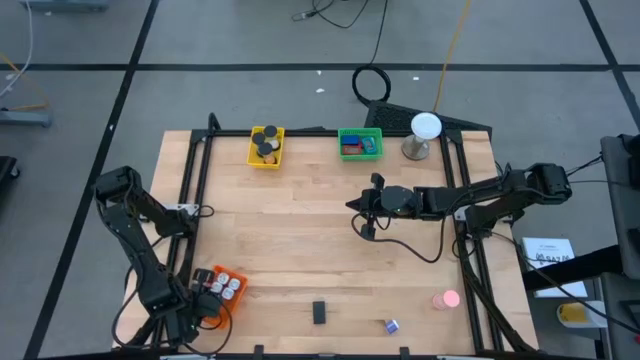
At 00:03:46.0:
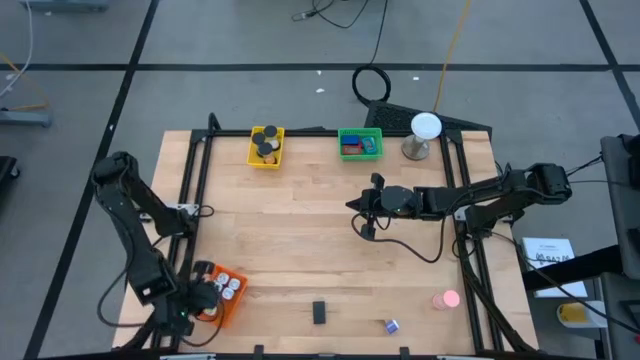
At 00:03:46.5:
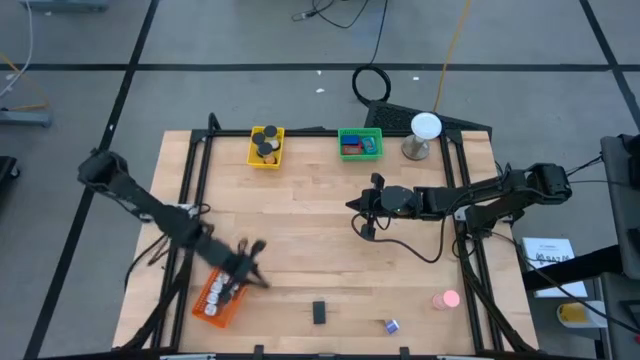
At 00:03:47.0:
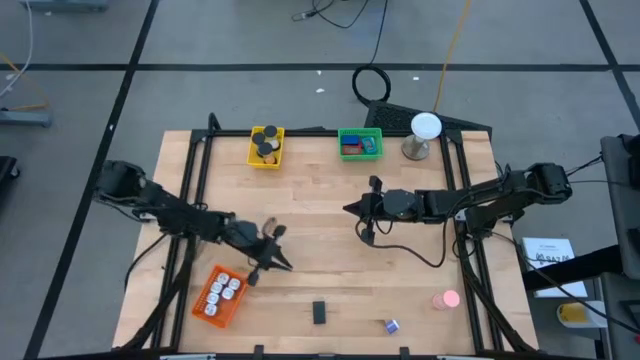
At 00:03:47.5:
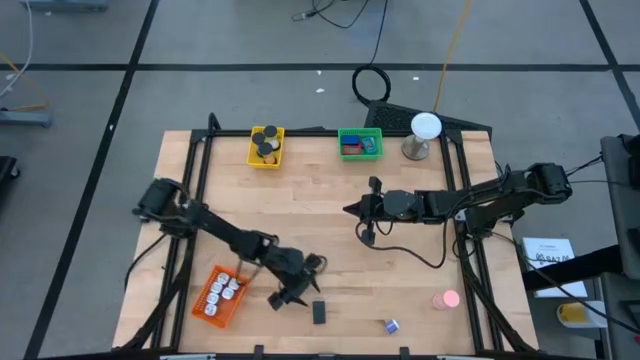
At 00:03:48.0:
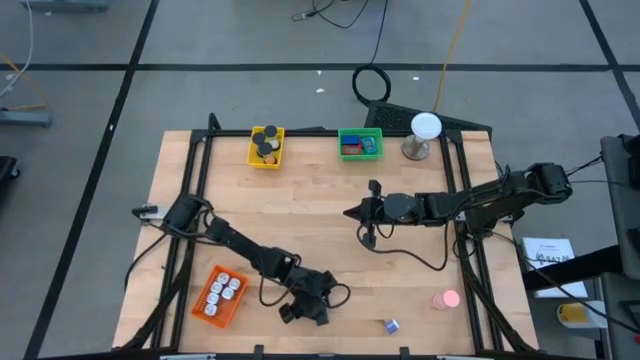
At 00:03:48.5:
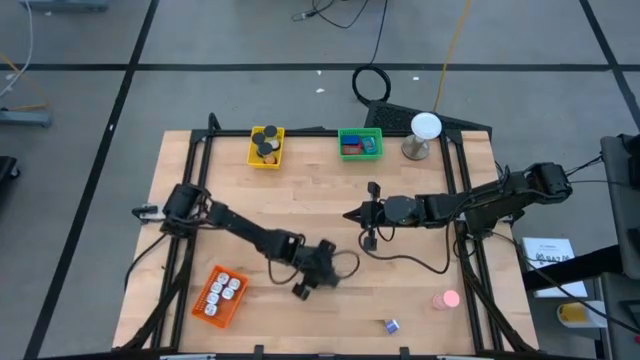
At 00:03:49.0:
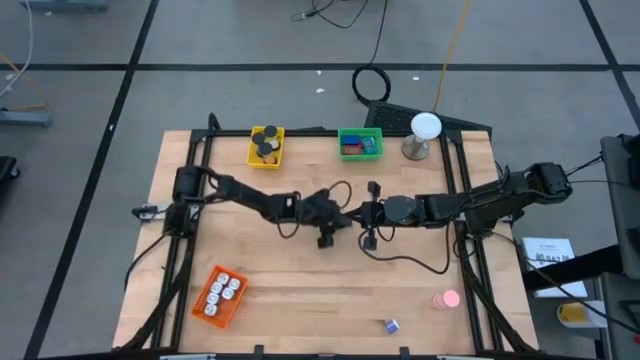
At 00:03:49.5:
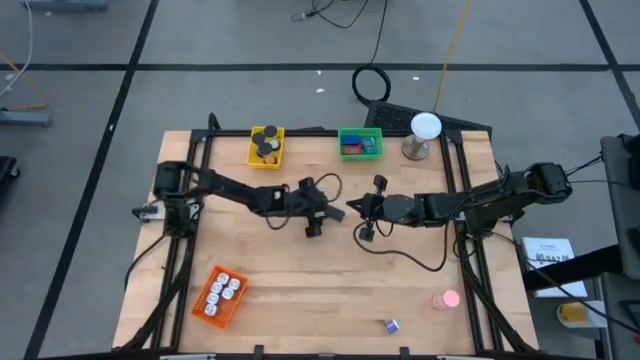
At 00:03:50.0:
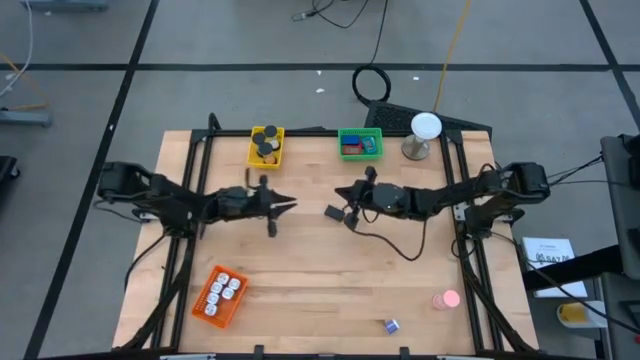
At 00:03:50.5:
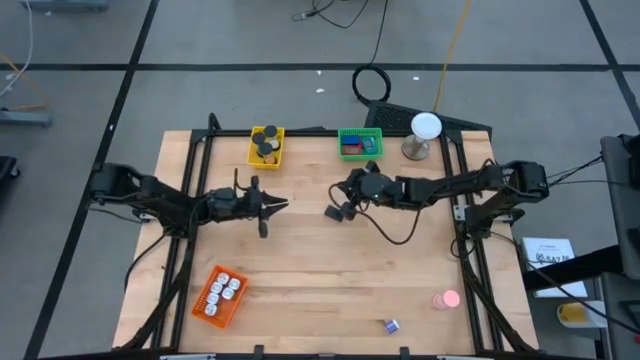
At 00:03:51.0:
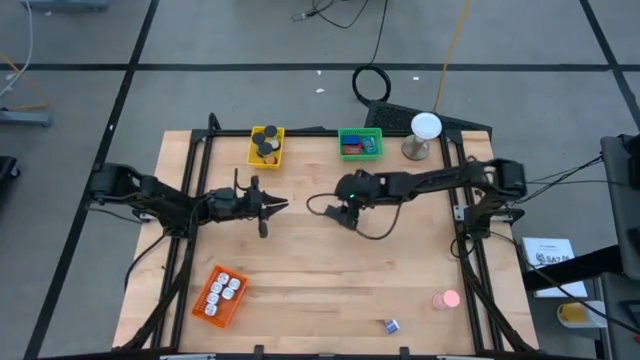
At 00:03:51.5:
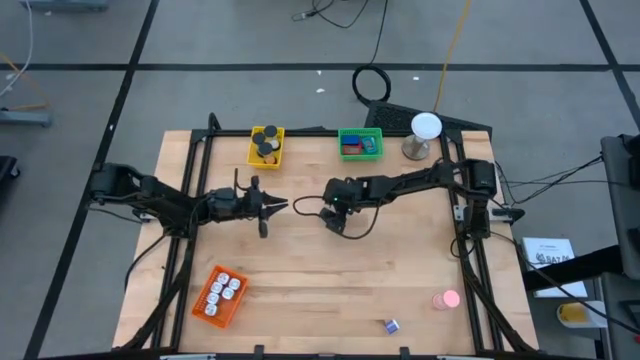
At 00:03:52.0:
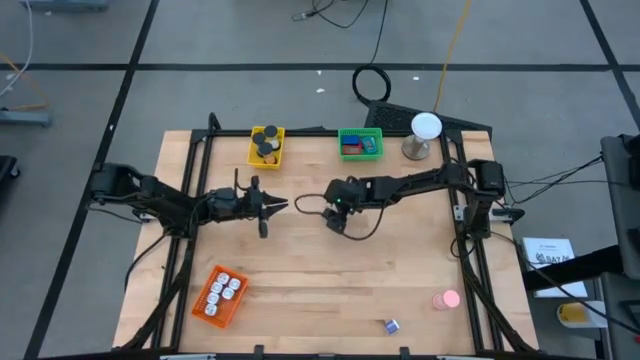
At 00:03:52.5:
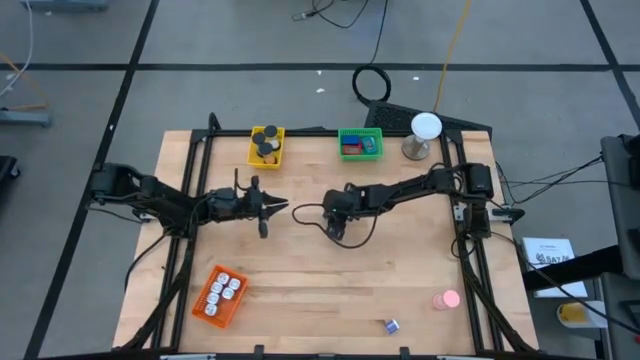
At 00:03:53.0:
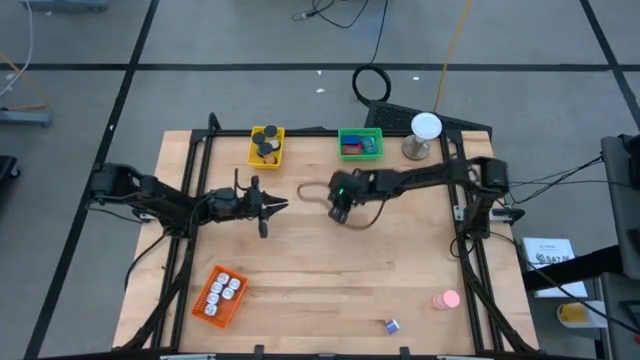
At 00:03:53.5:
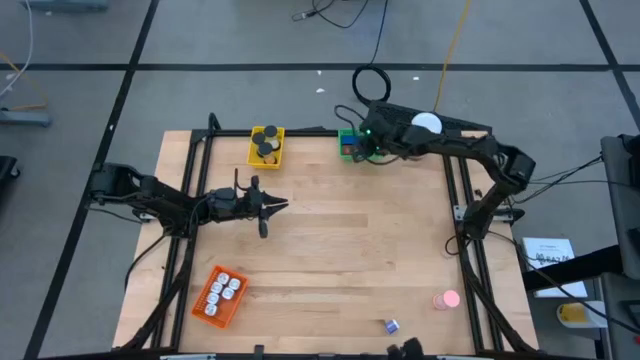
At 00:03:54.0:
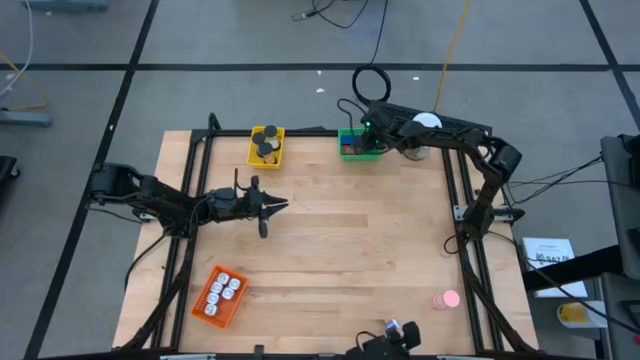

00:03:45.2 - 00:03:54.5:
Task: Pick & Place Office items
Put the black digital clock into the green bin

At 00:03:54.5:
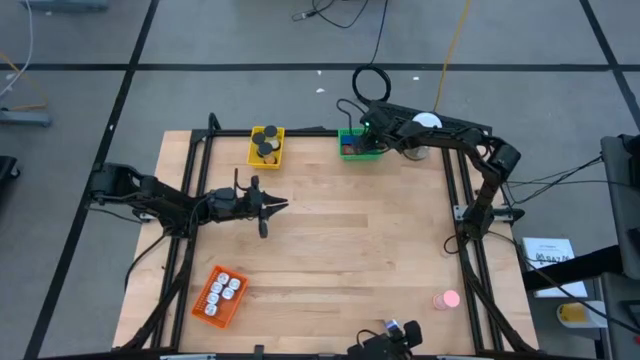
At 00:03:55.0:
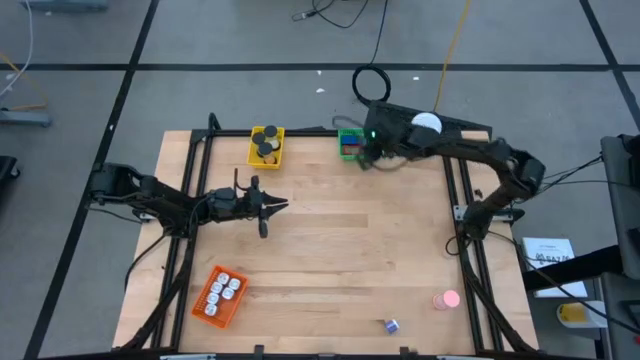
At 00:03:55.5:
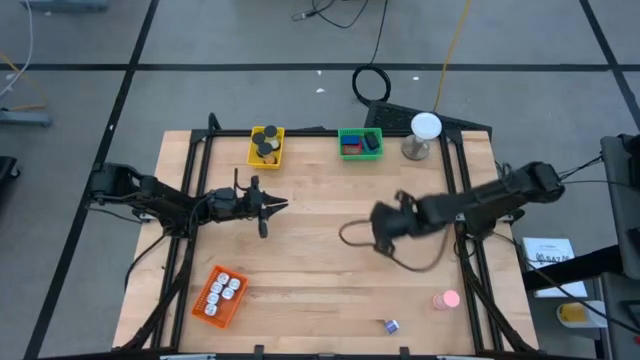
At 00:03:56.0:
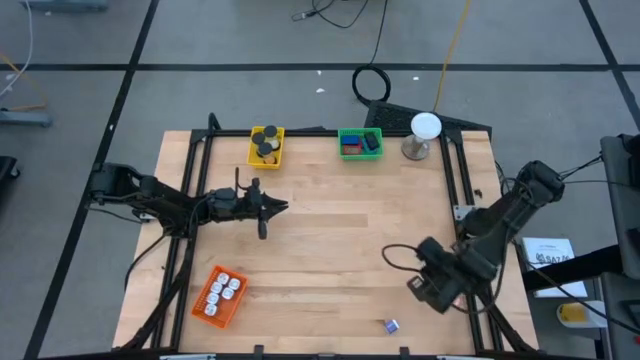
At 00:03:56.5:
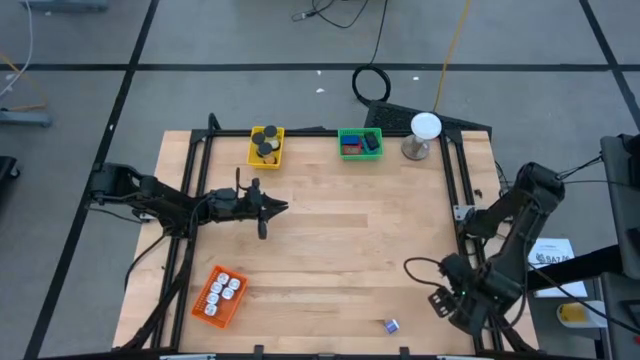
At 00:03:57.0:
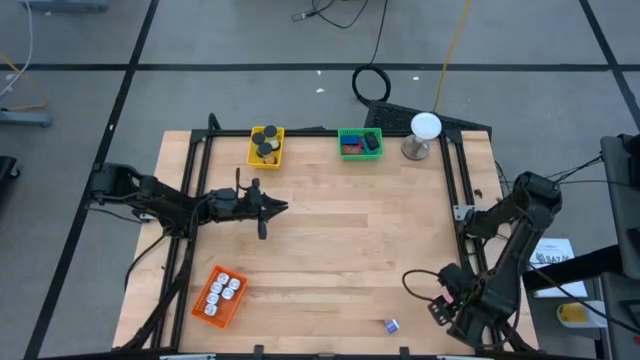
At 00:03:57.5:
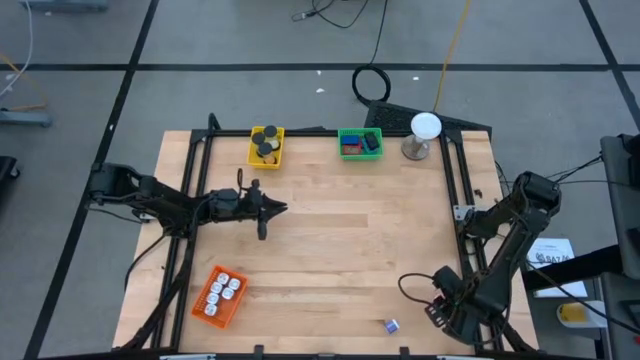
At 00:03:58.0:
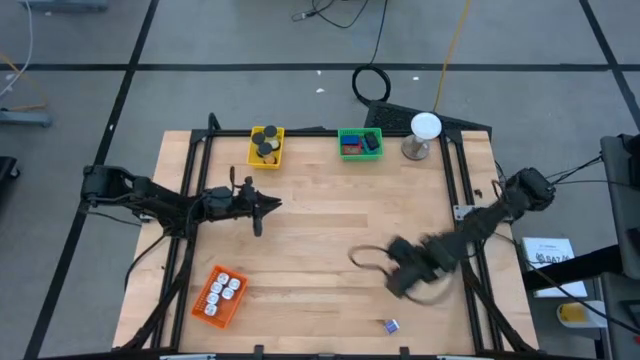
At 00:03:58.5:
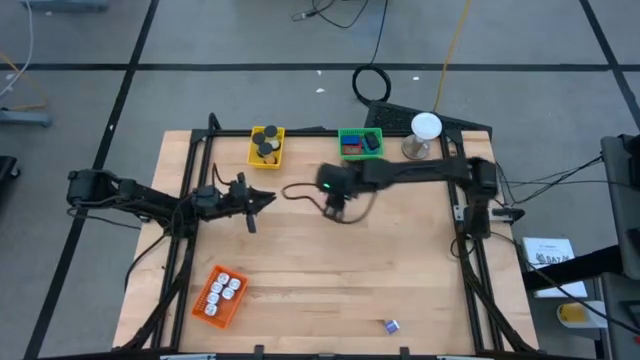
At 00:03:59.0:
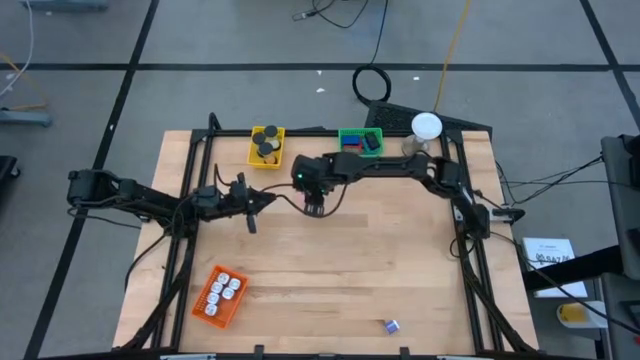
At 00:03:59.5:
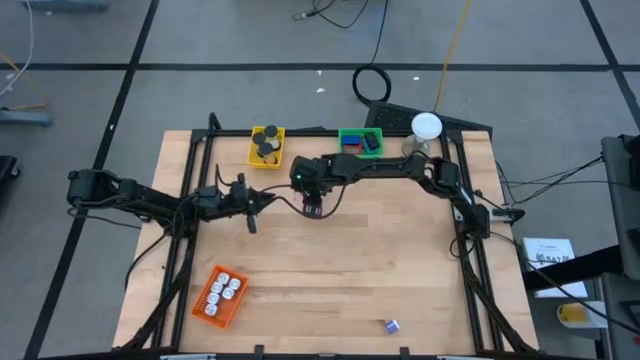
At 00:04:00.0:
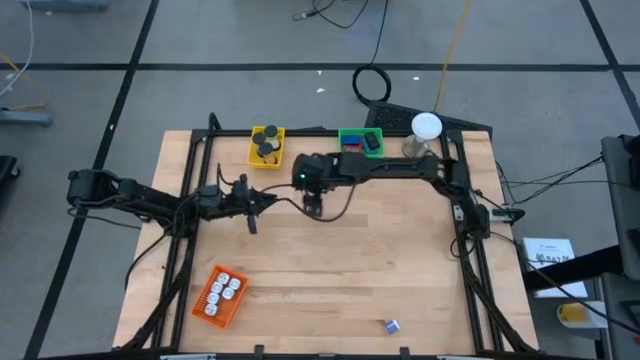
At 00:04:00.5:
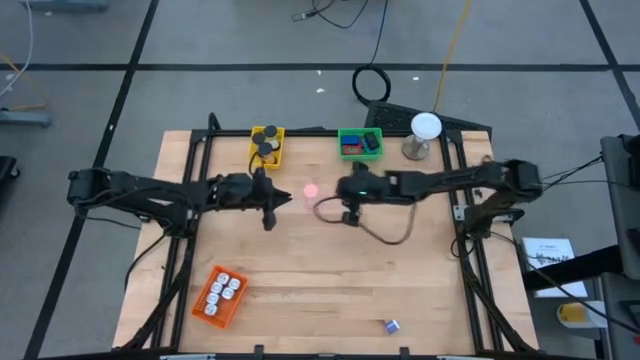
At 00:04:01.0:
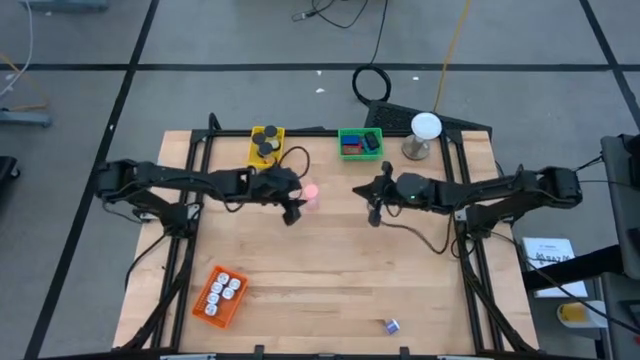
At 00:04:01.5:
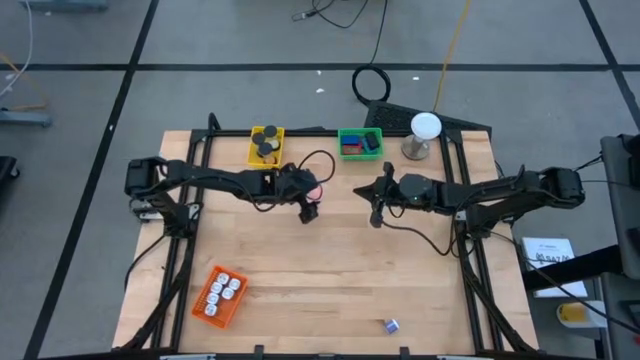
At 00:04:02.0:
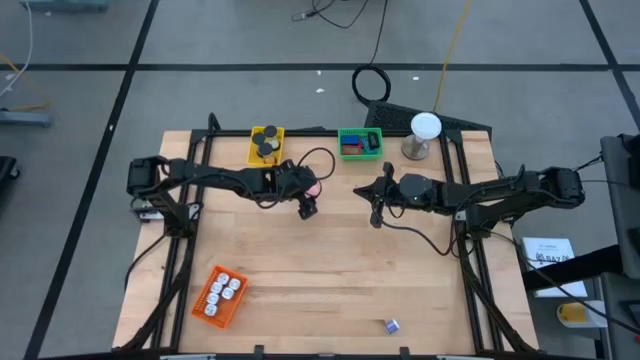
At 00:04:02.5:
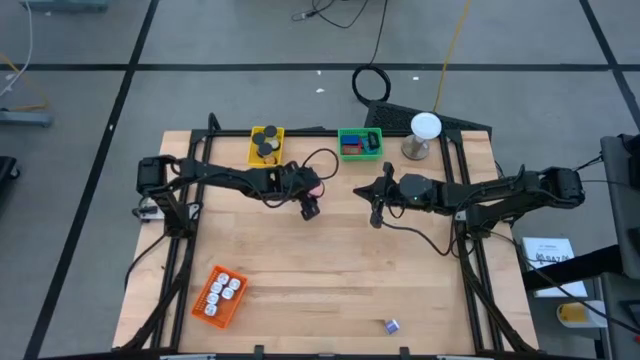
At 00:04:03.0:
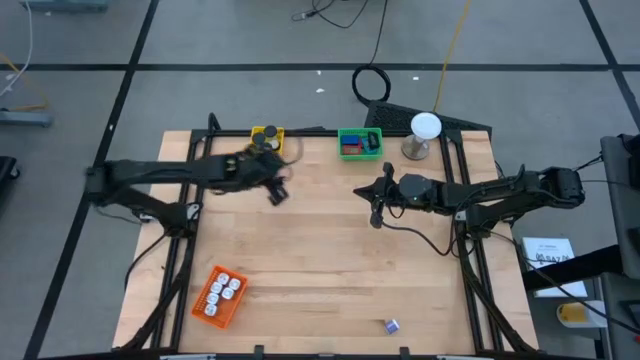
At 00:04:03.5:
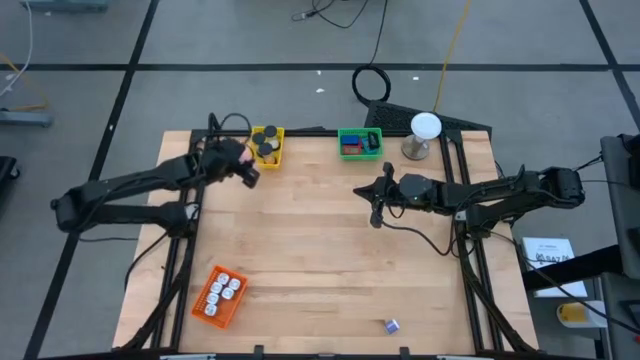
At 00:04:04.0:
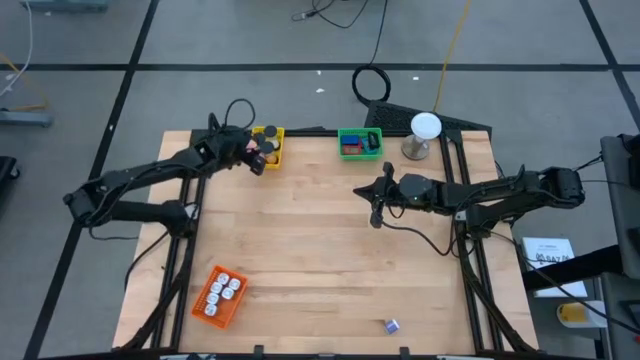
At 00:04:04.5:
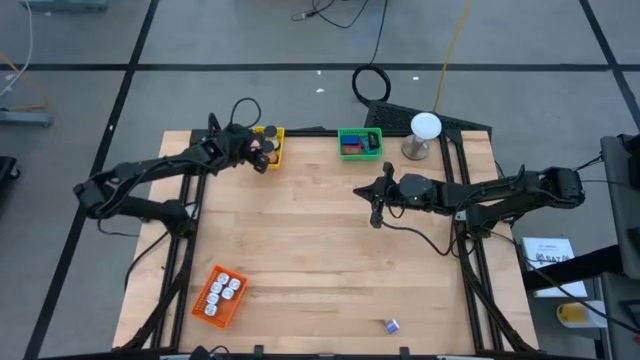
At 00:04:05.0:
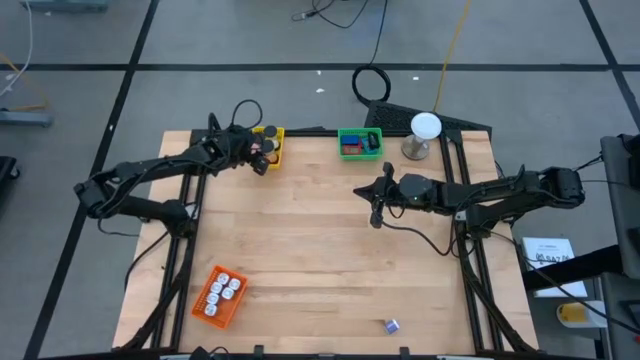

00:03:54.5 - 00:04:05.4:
Put the pink hourglass into the yellow bin
